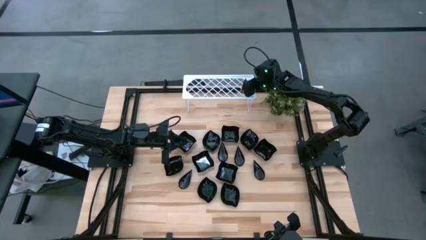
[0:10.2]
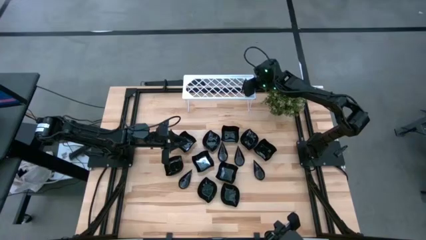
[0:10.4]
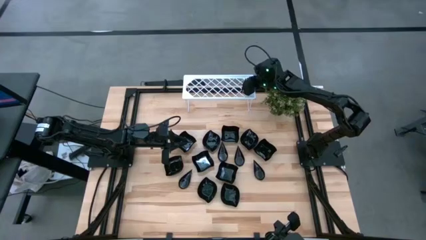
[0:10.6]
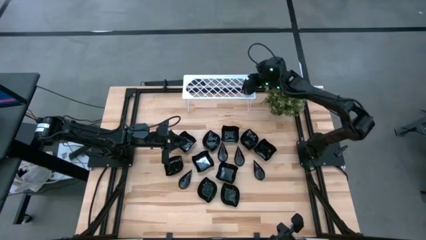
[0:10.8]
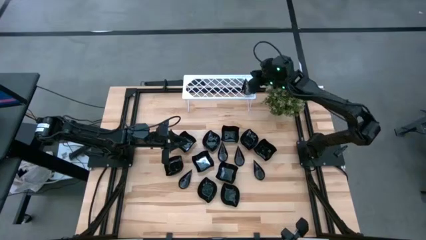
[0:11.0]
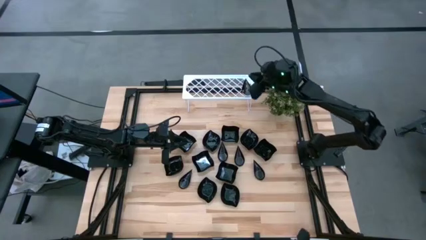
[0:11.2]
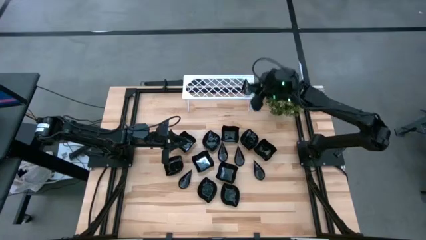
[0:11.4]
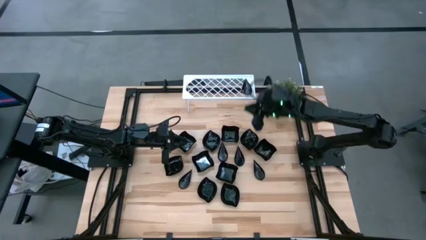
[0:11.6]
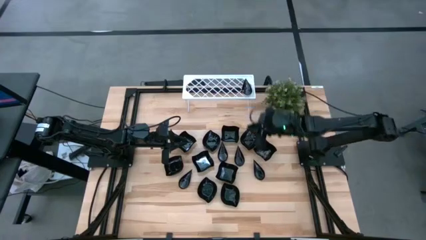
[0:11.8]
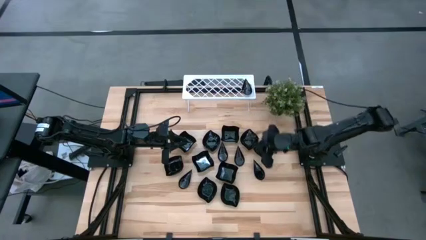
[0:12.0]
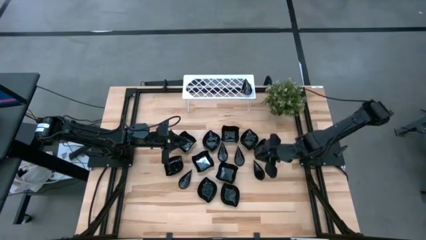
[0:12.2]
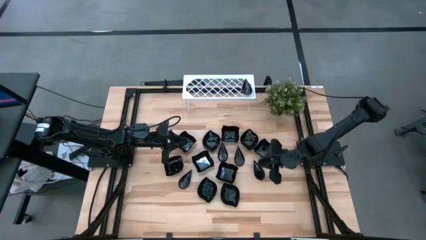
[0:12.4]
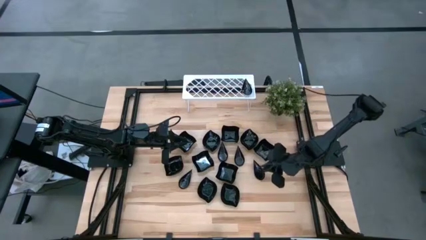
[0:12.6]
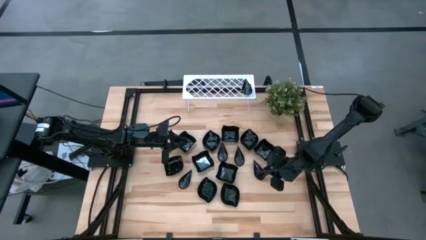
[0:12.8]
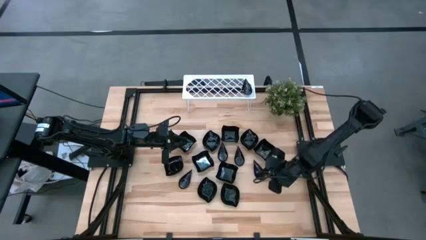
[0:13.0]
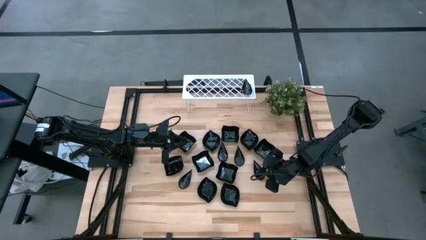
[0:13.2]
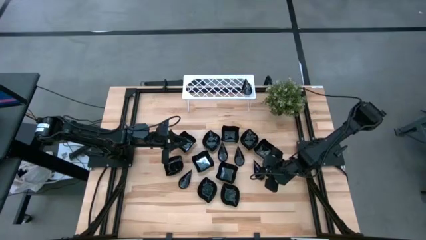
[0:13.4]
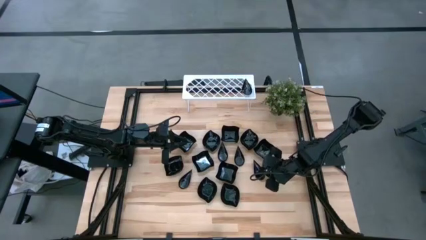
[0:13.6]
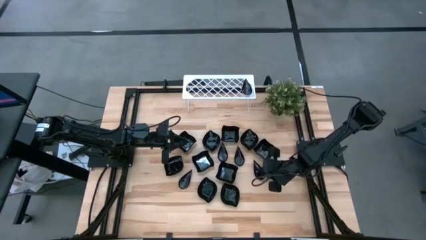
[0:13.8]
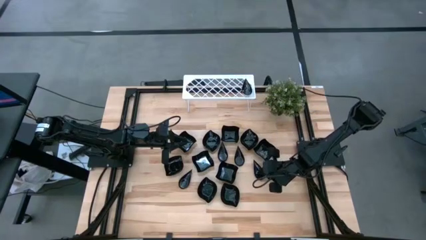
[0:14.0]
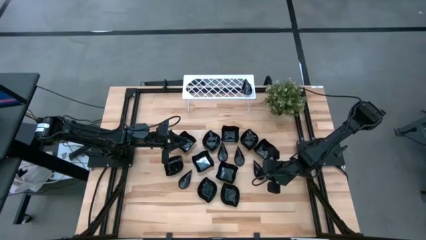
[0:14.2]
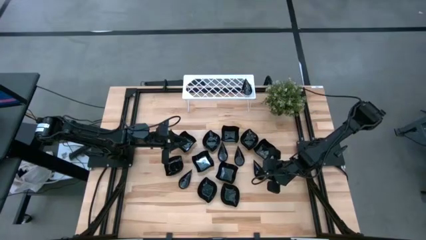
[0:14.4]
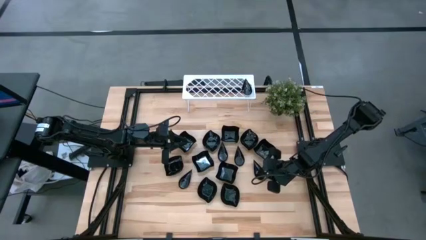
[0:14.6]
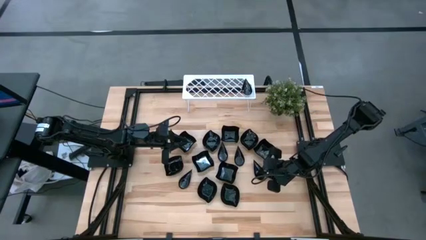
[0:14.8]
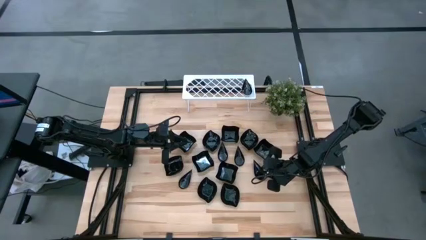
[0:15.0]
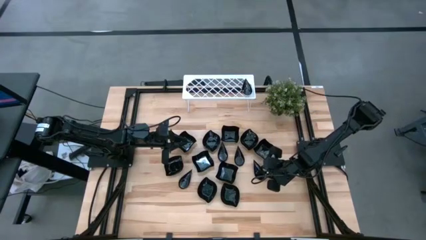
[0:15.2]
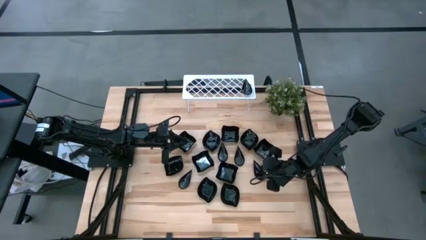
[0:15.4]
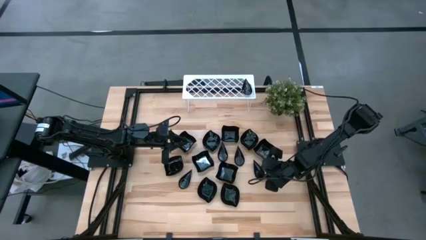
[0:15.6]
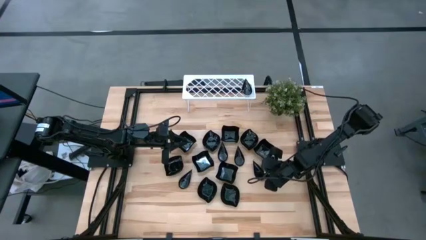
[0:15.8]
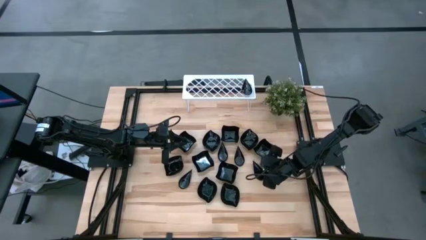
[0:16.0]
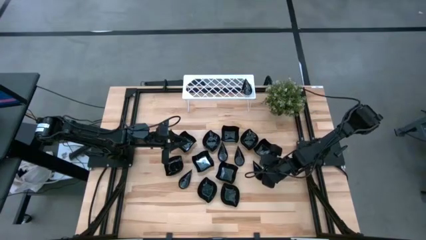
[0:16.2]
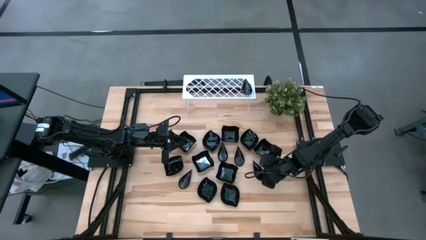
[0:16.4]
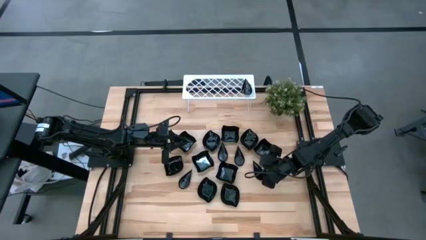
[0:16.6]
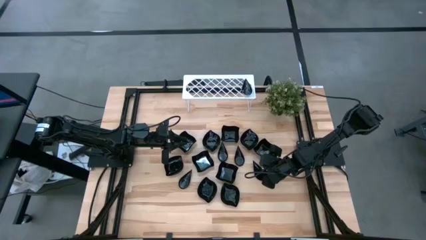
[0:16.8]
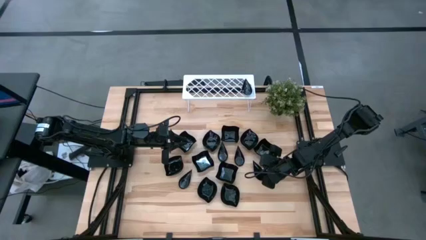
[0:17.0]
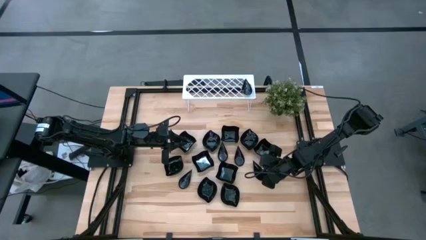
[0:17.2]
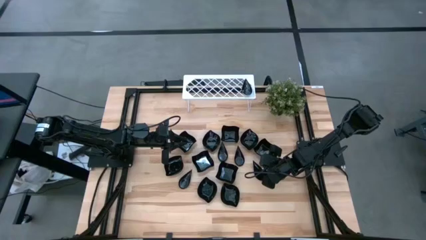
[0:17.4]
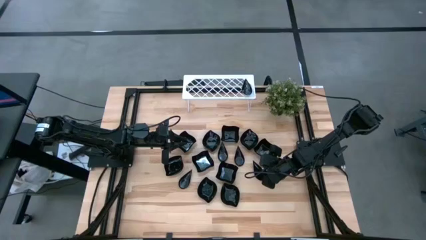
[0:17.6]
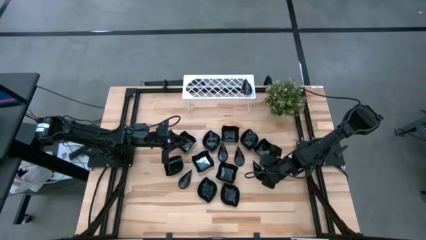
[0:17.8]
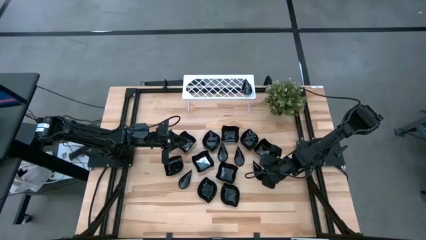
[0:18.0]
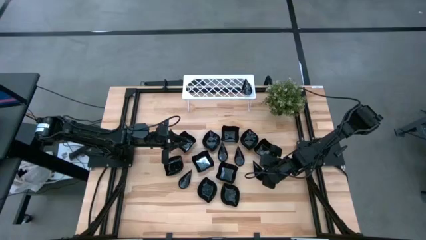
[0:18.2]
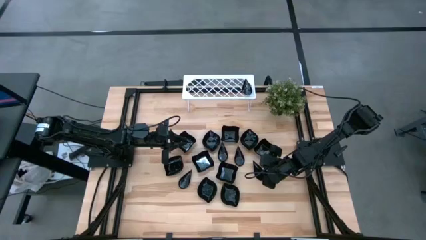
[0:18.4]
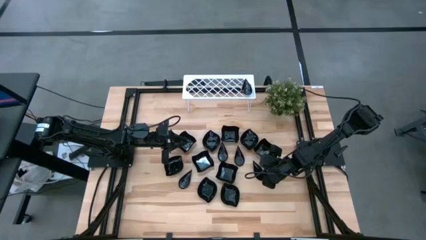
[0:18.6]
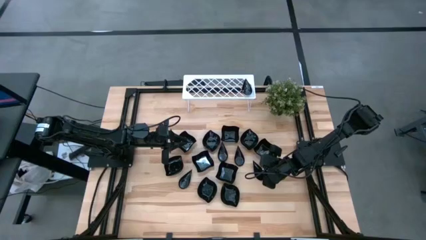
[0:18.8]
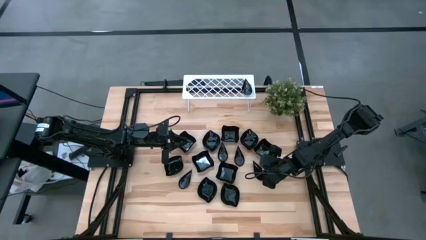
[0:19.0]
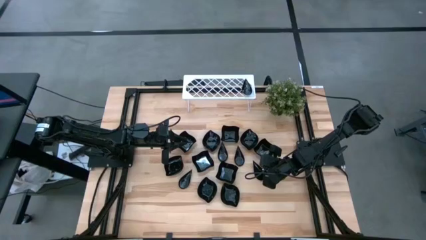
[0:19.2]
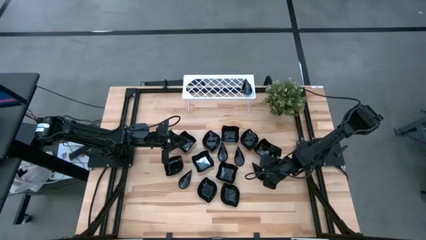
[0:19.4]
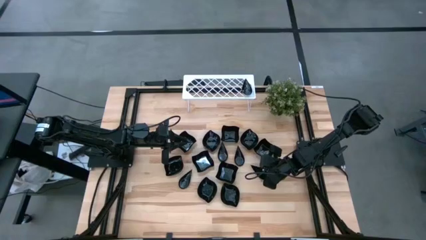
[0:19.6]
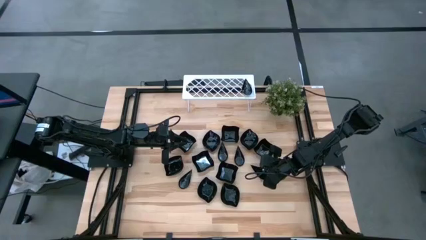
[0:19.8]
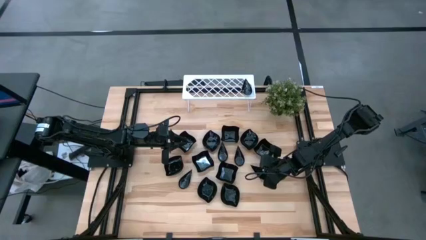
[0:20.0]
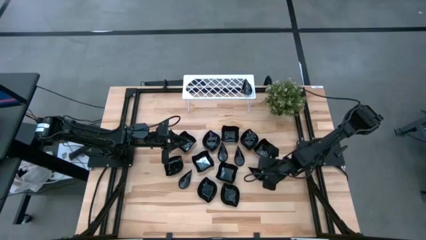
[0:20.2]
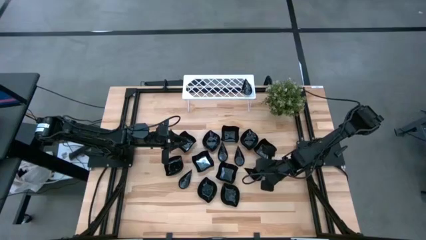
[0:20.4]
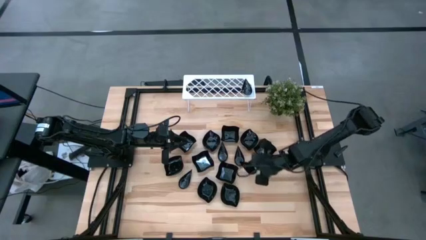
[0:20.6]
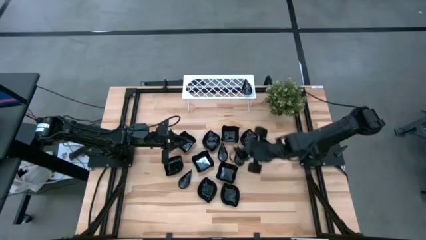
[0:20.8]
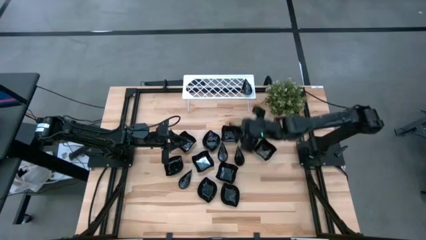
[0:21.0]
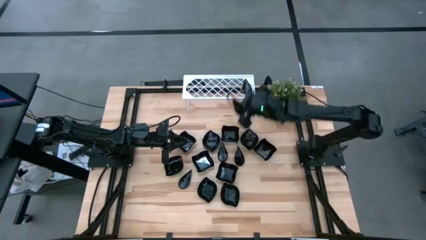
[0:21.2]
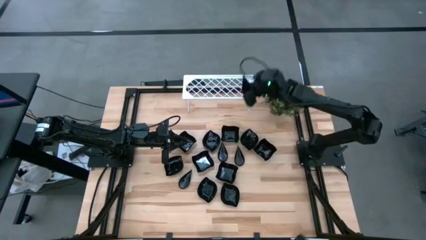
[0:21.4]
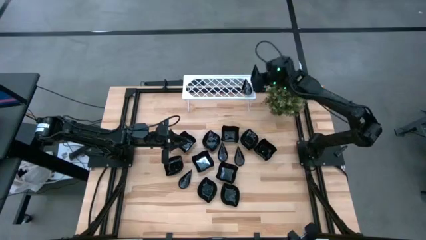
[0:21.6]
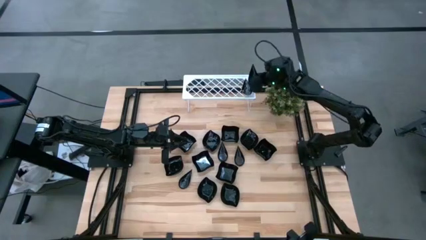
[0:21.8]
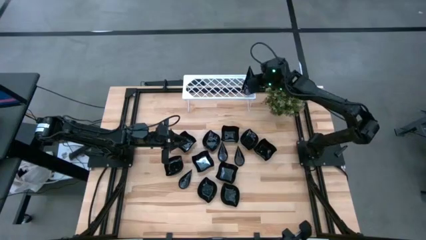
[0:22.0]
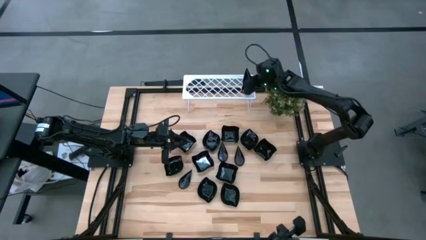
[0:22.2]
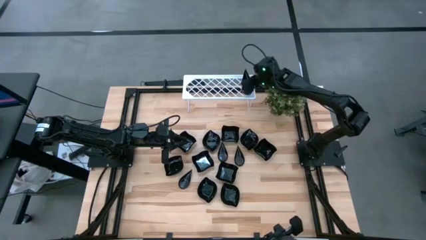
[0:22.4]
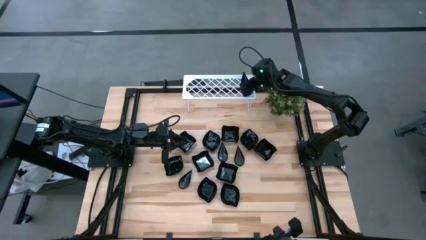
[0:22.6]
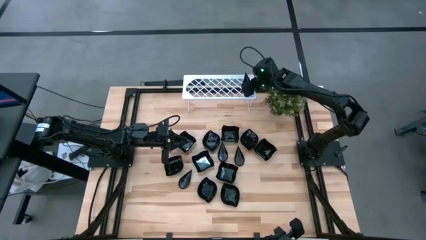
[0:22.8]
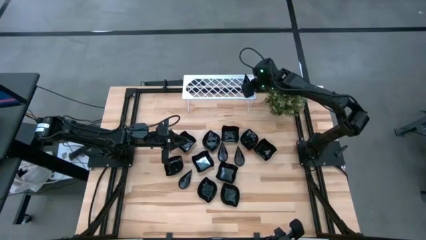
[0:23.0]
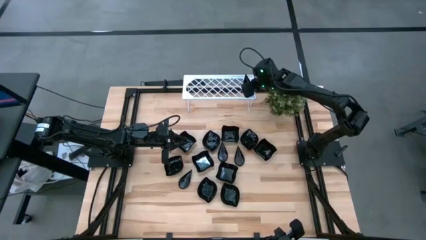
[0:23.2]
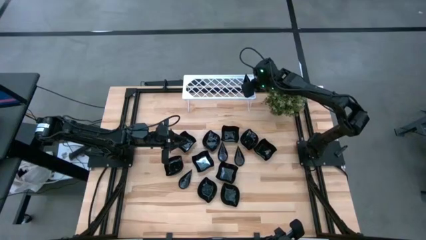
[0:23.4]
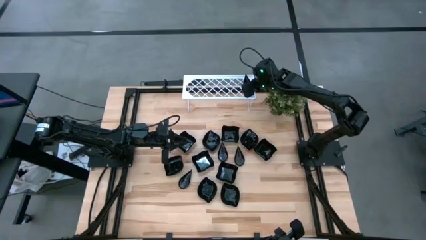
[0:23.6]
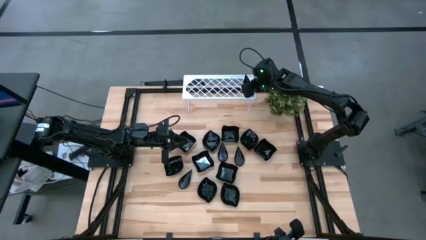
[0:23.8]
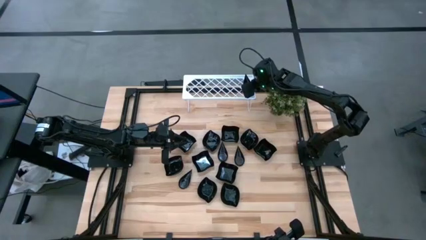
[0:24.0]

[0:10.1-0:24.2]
Task: Pick & Place Mini shaped plates
Stack the drop shaped plate on top of the drop shaped plate on the shelf

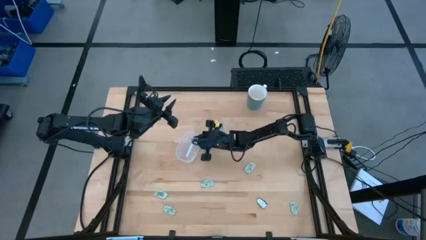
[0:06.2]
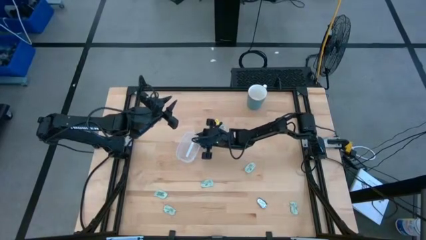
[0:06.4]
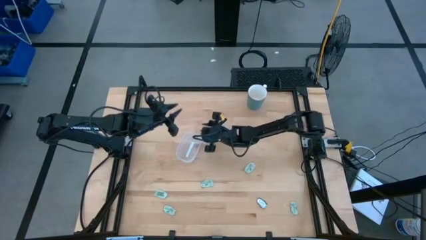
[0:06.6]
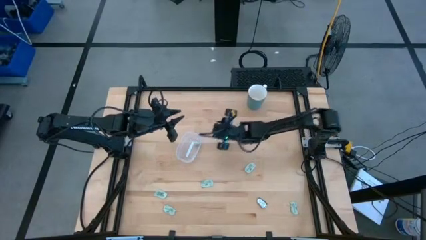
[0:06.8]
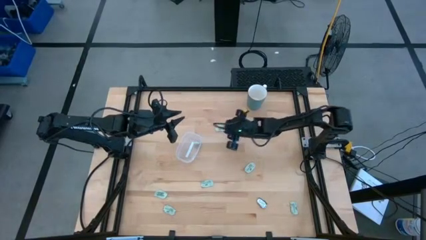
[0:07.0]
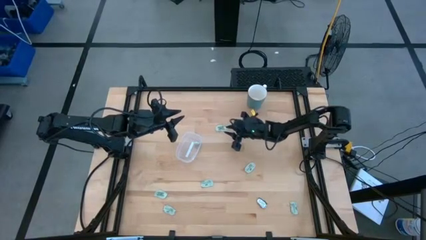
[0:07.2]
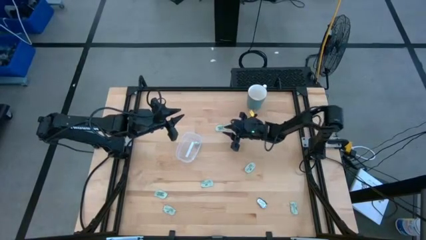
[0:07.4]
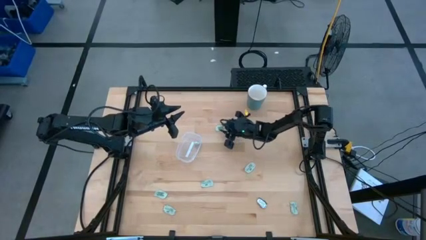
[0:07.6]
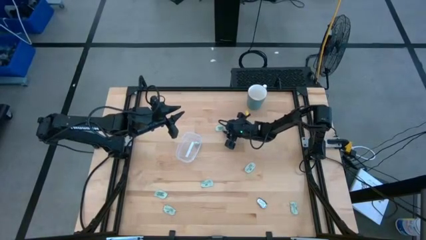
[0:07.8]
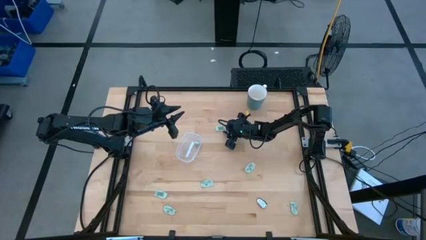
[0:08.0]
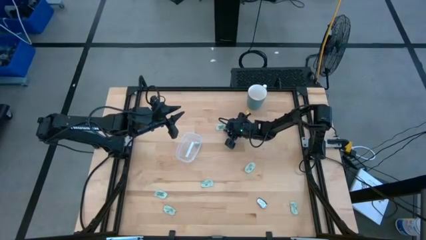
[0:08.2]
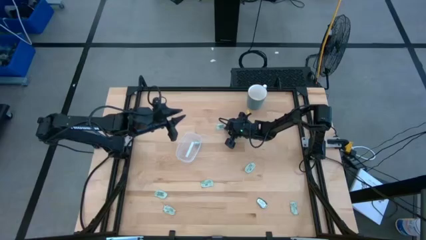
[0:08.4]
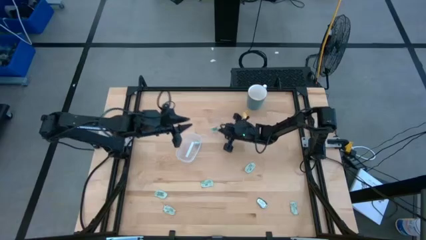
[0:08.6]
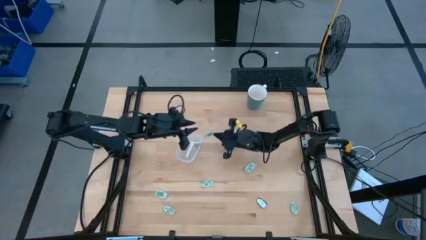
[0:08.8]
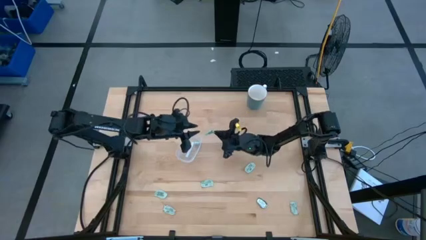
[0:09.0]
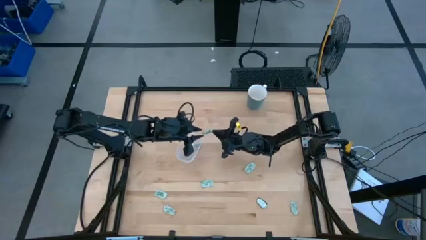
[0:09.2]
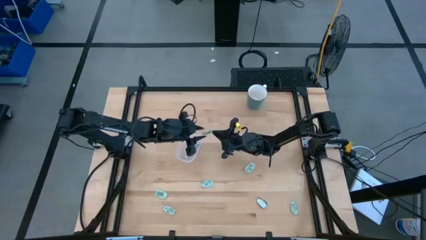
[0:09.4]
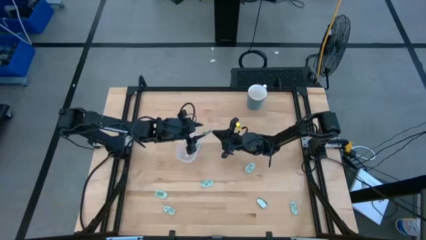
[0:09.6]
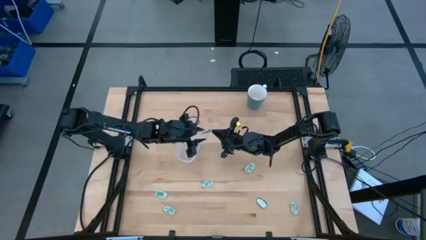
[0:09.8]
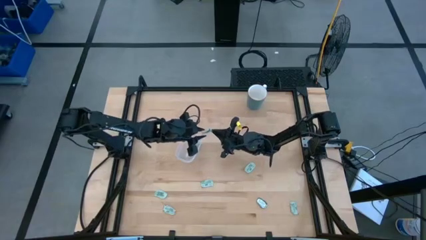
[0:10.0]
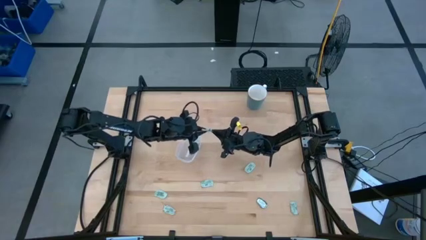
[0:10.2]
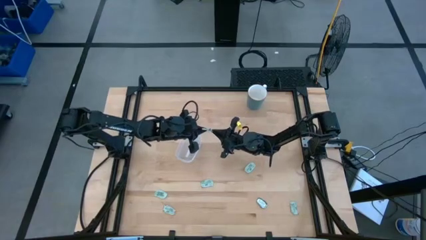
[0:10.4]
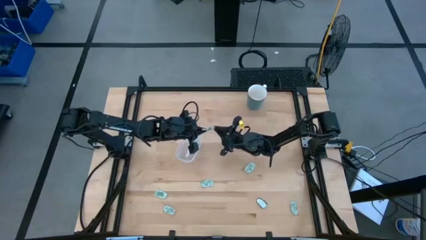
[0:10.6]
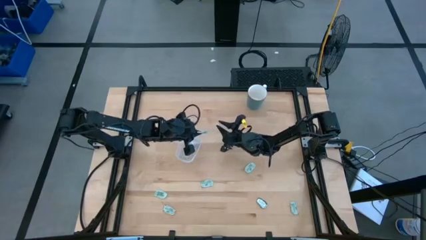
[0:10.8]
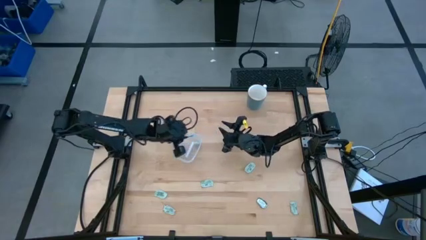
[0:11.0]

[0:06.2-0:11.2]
Task: Pick and place Stevia / Truvia into bins
Put the green stevia packet into the transparent bin
